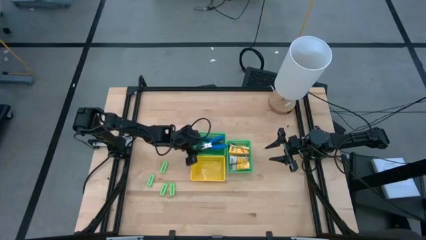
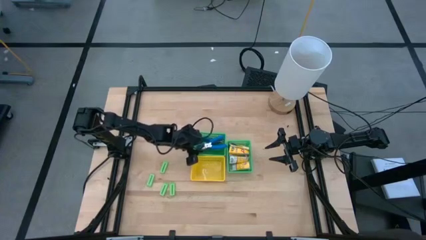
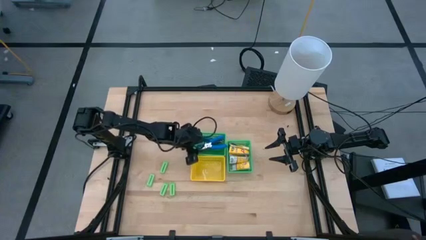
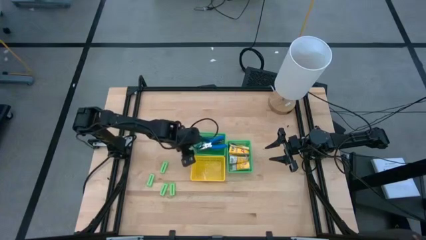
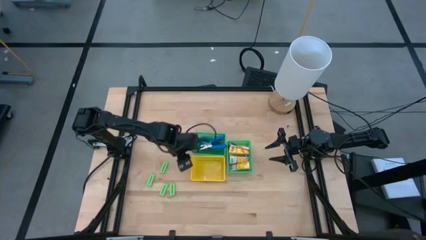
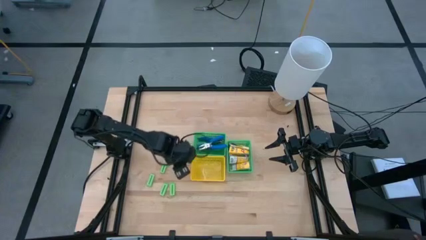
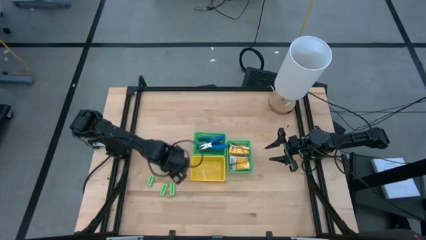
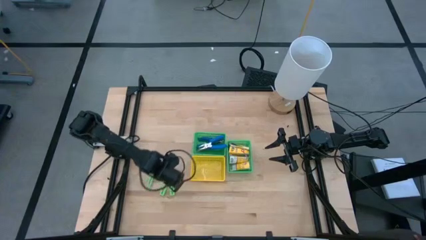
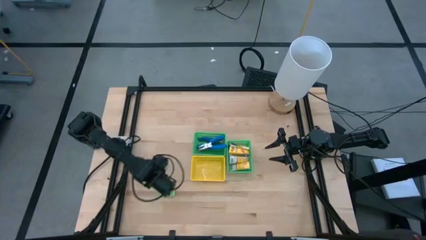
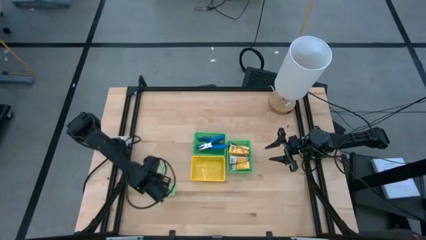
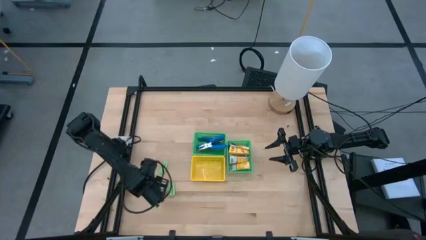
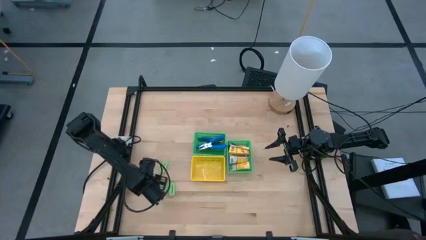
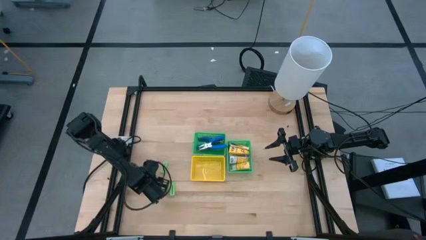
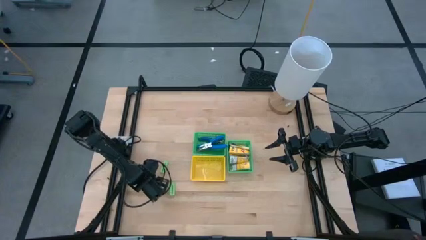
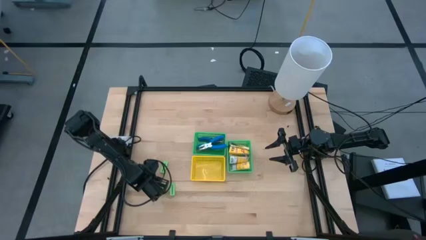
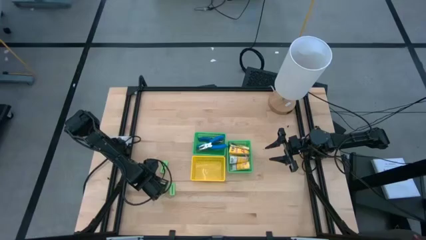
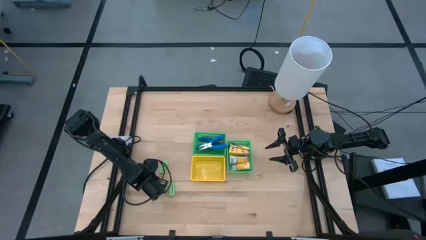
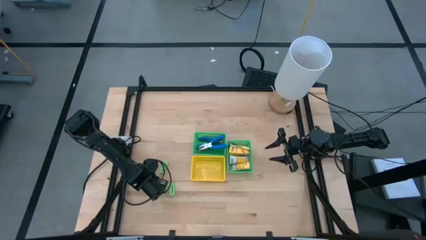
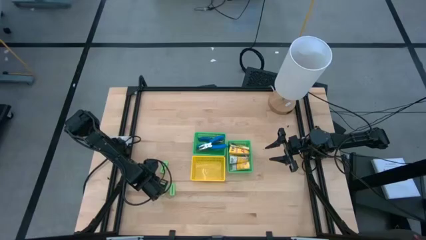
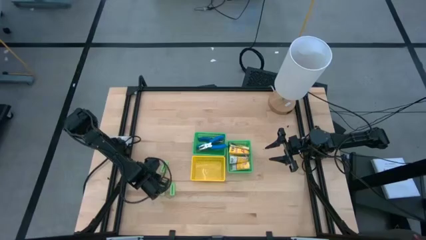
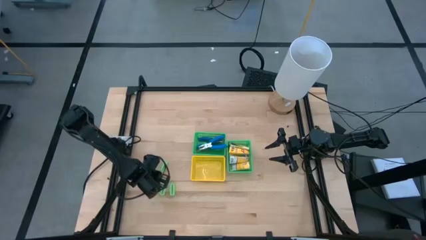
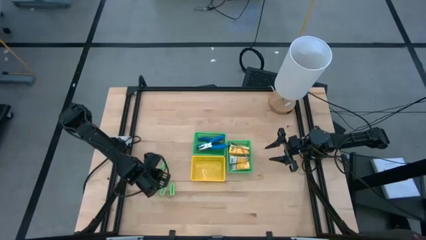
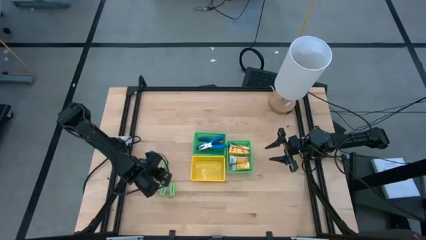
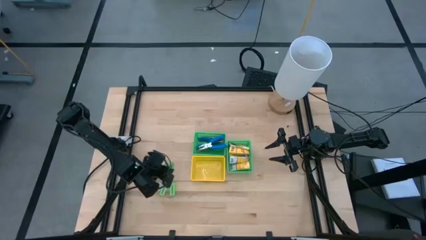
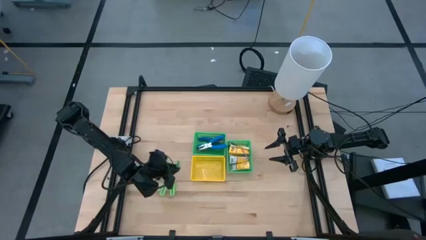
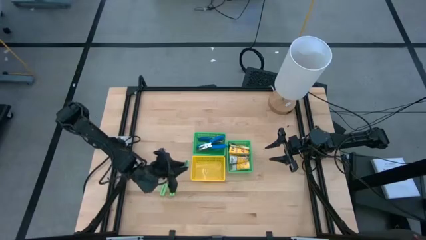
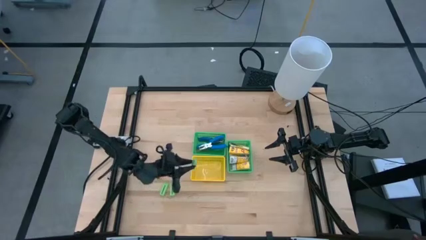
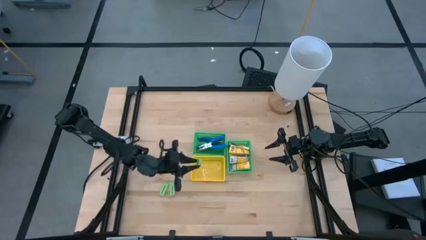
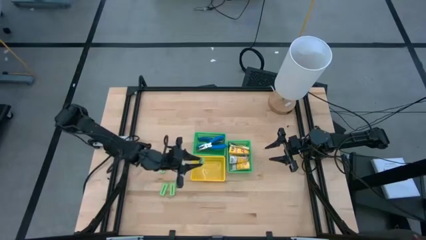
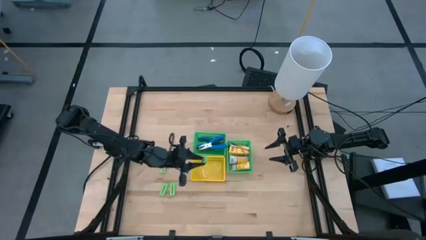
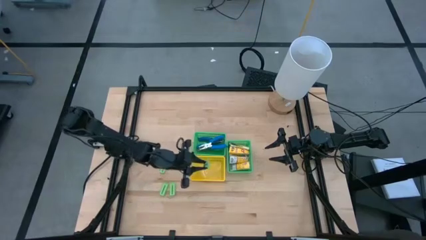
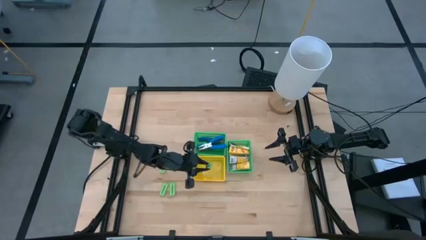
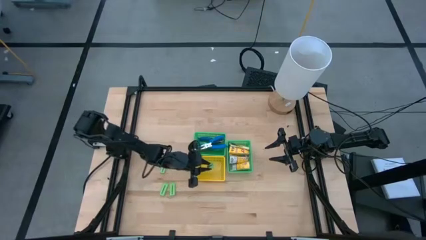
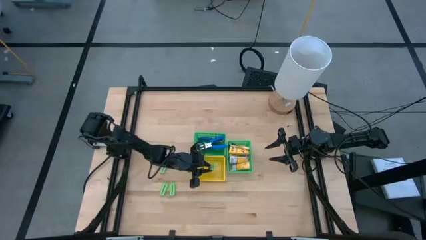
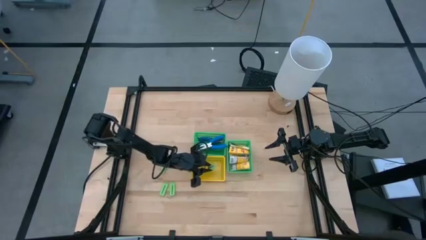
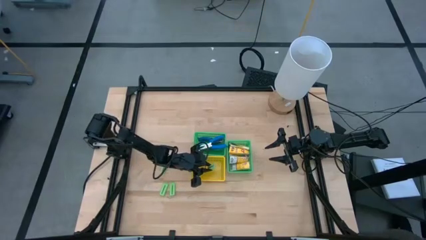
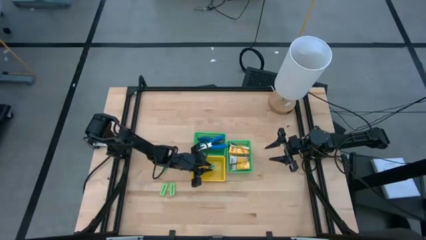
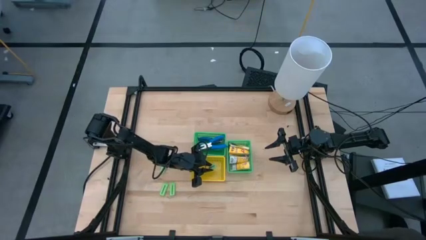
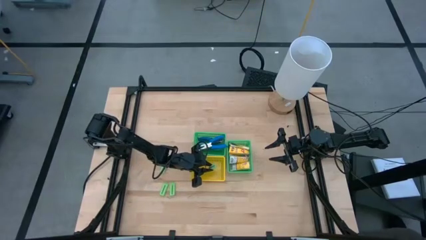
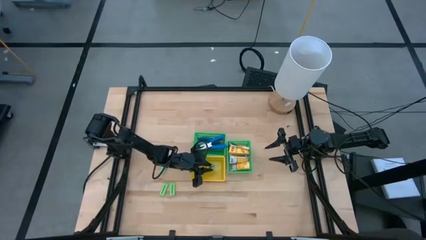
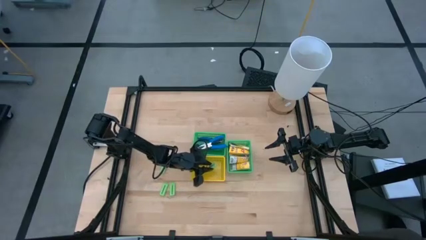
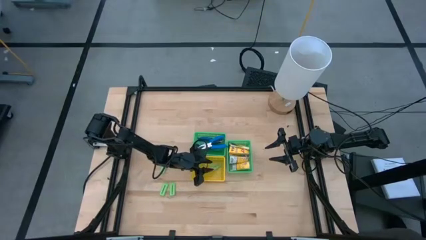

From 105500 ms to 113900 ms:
Task: Pick & Place School Supplies
Put the green eraser into the yellow bin

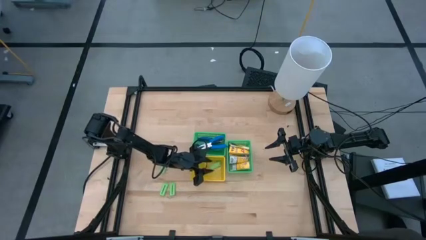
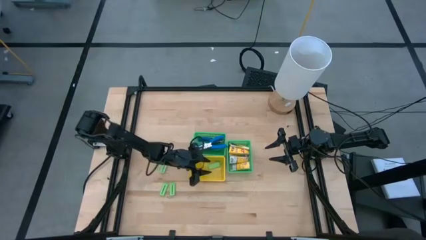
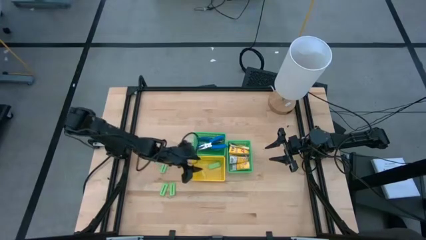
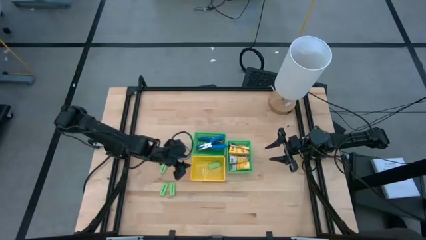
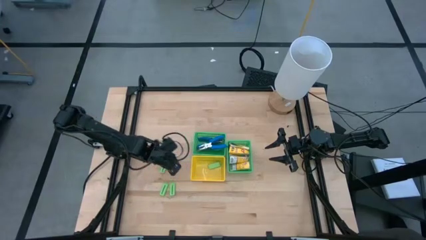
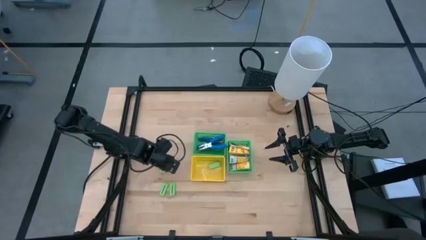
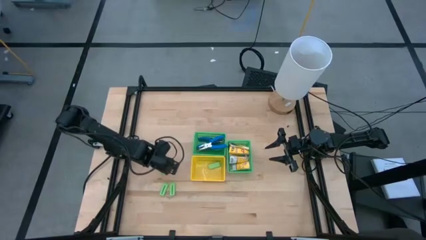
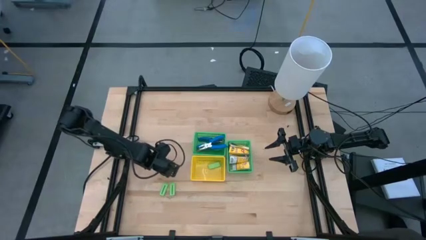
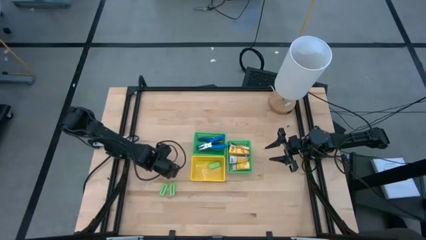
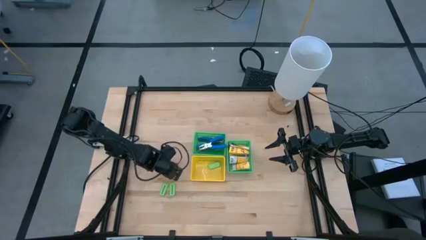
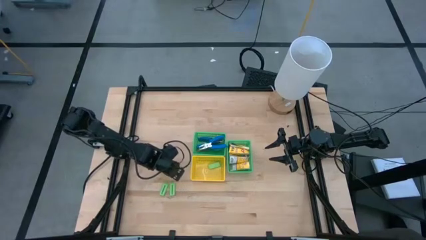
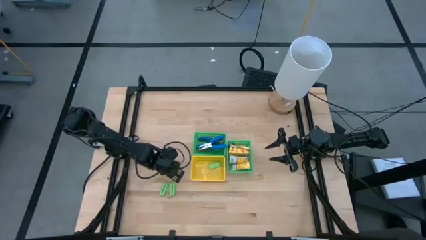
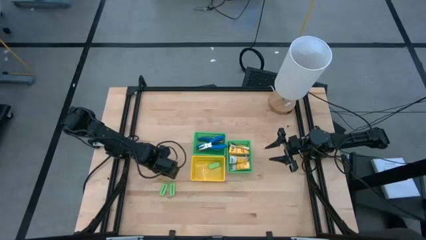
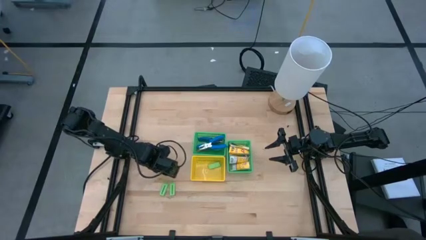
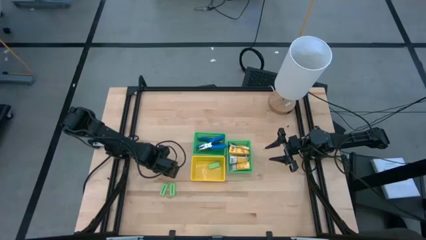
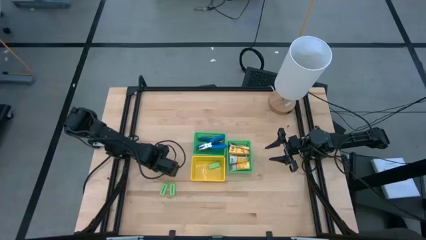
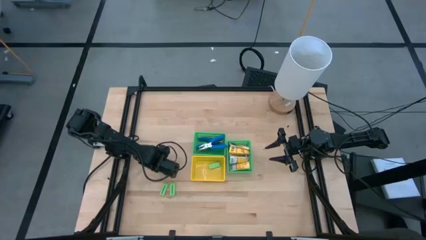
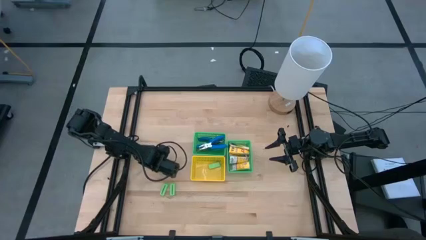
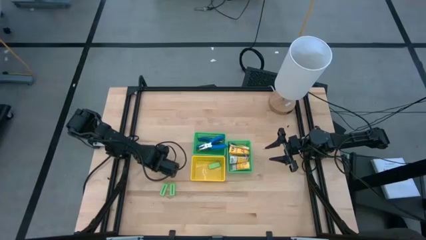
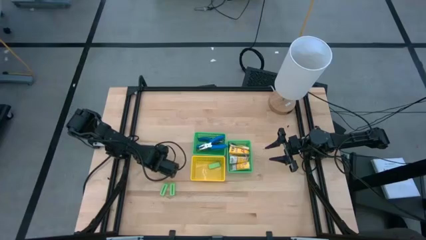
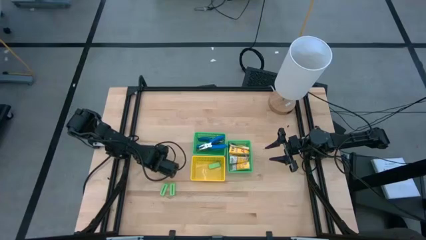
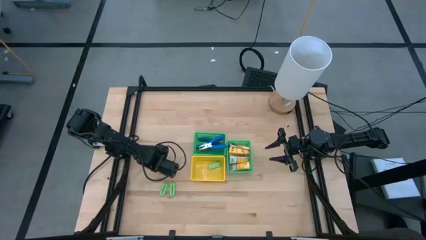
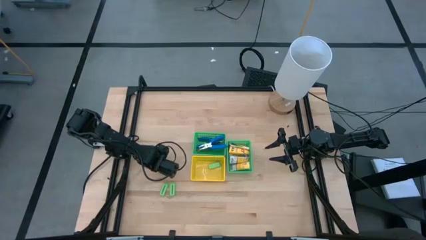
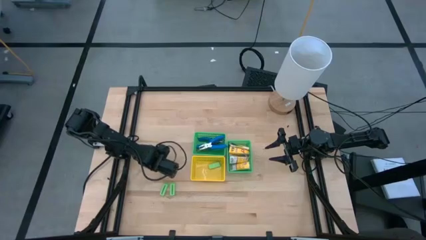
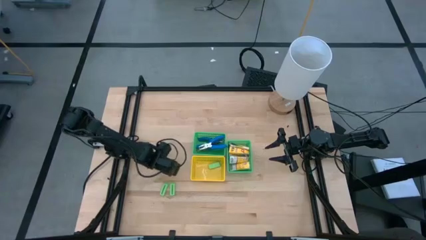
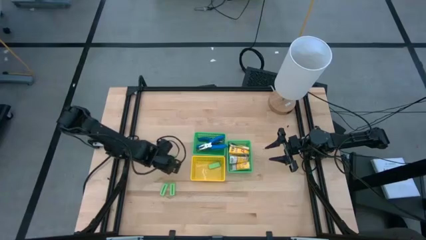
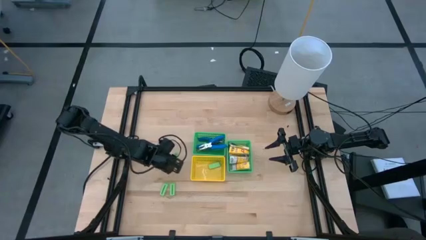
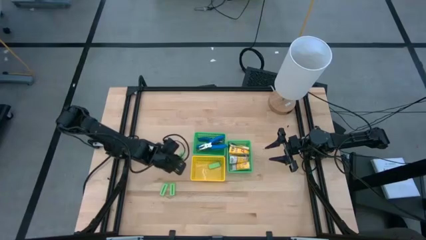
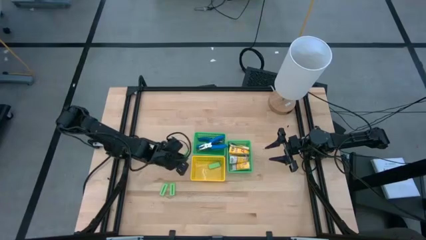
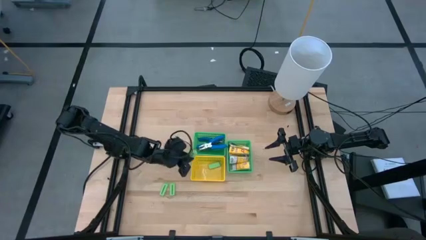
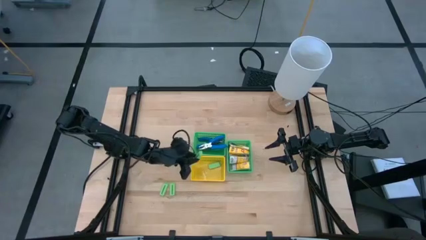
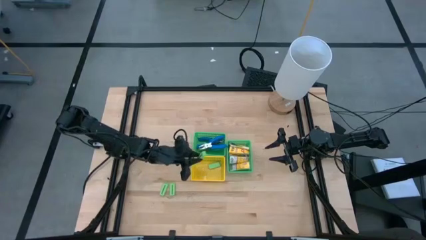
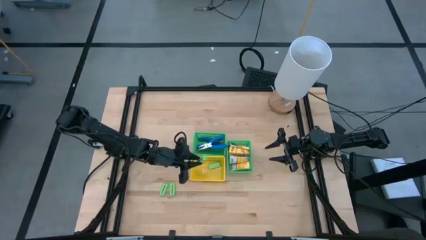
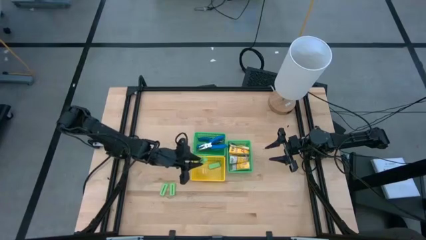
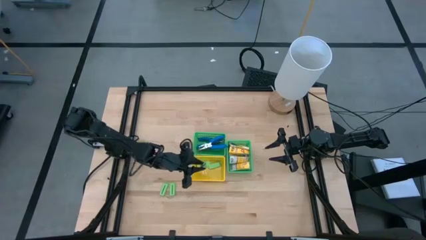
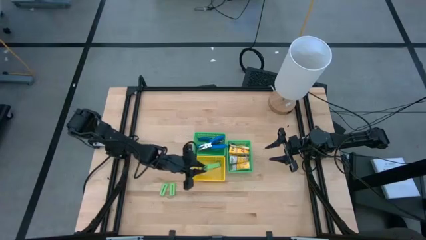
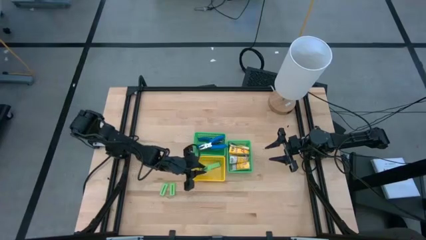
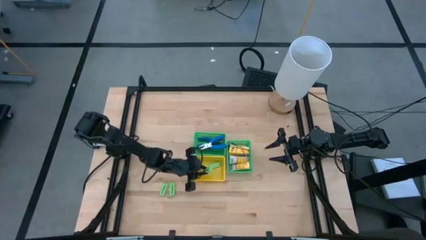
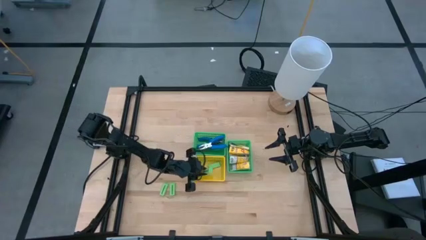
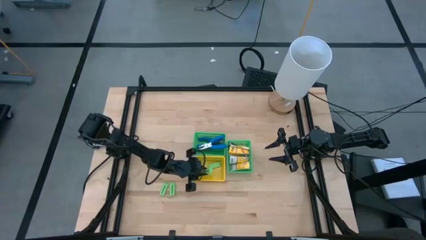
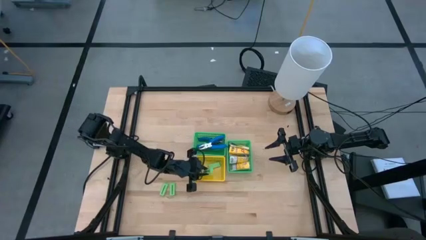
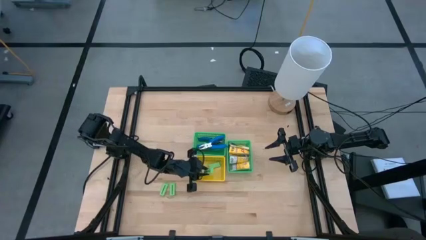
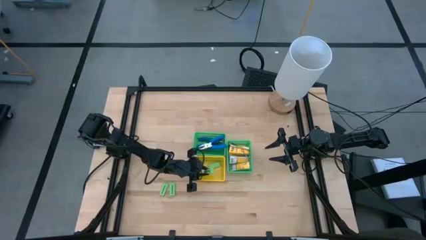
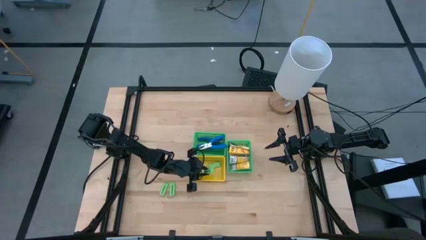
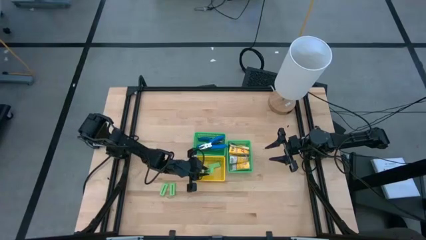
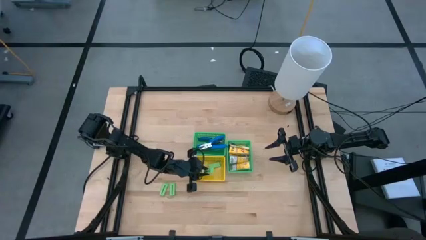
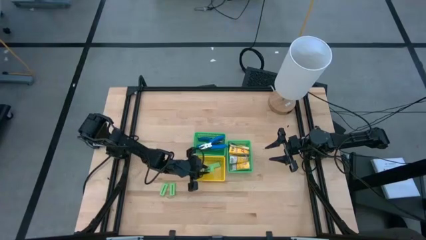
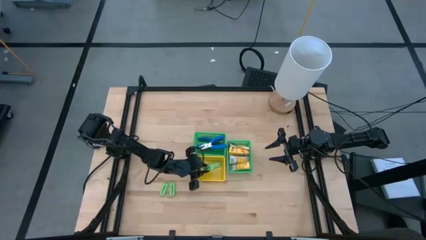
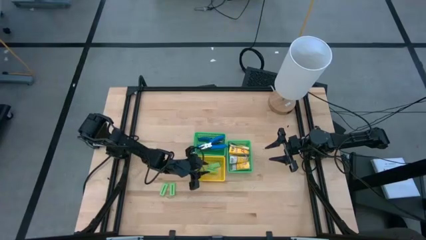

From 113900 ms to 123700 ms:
Put the green eraser into the yellow bin
